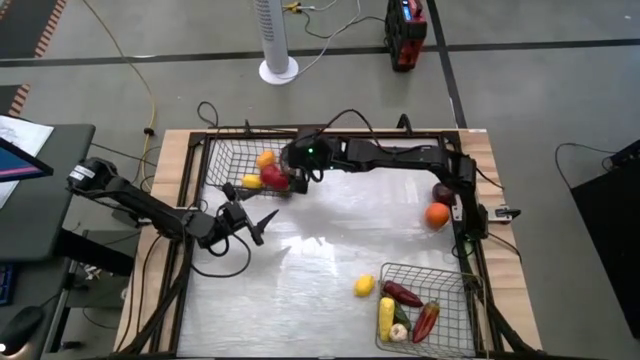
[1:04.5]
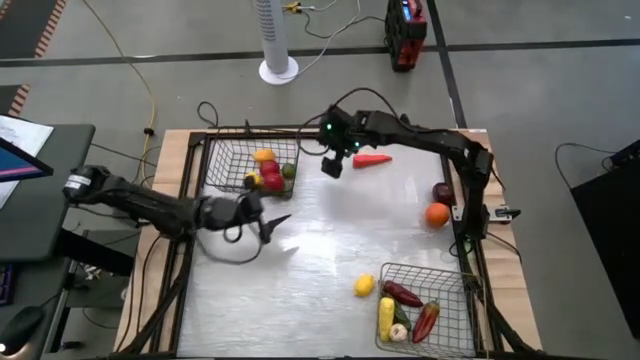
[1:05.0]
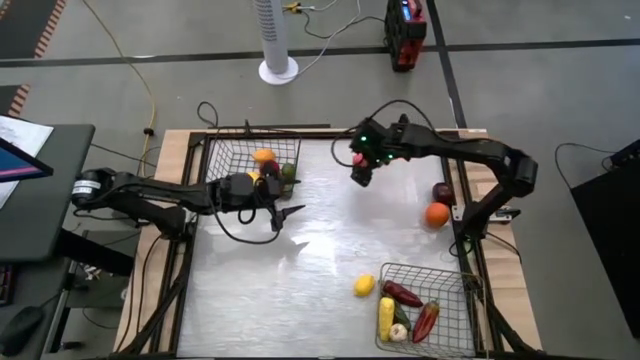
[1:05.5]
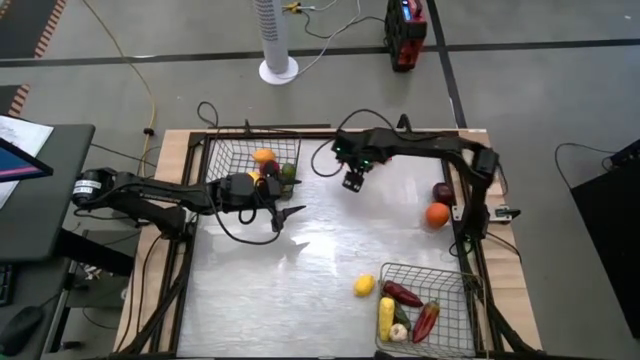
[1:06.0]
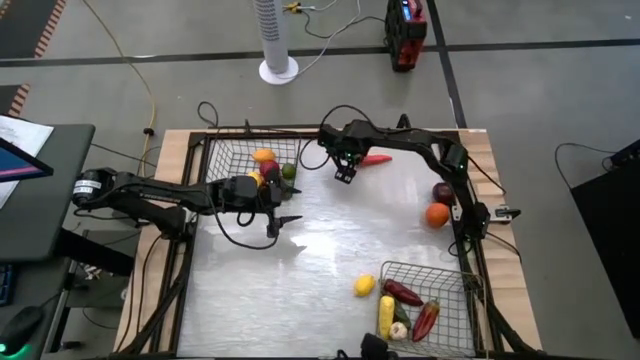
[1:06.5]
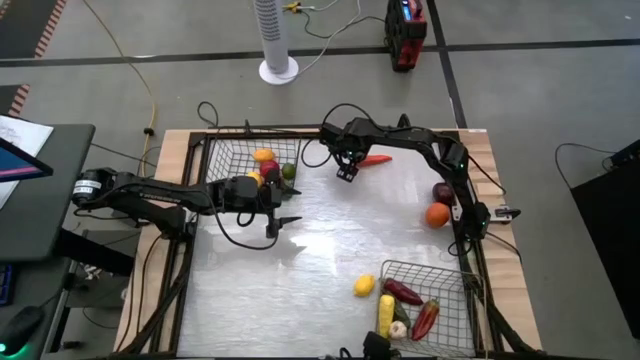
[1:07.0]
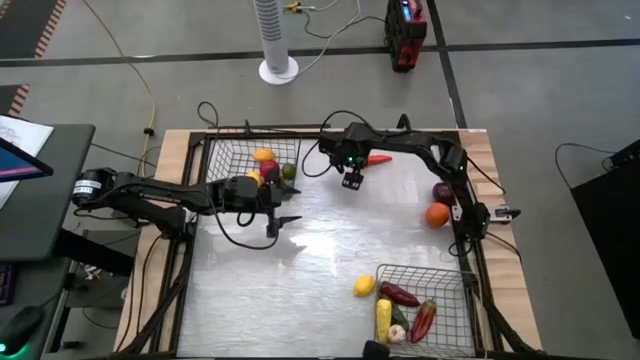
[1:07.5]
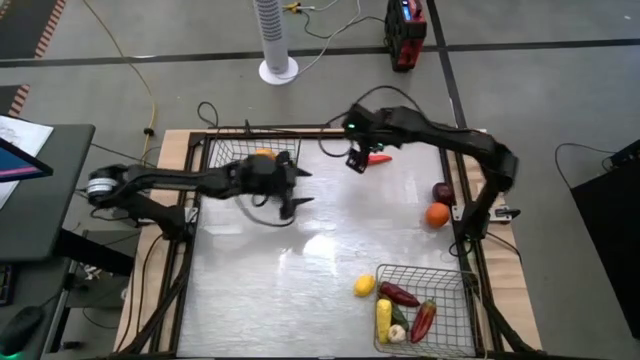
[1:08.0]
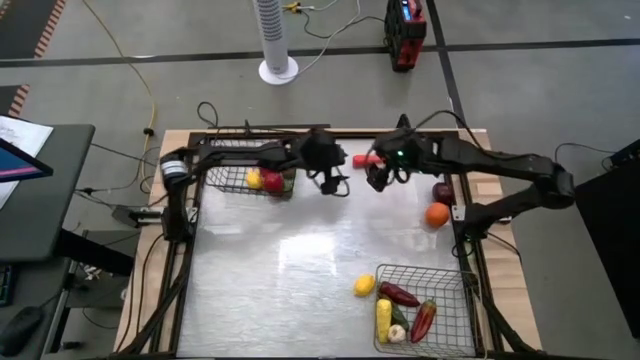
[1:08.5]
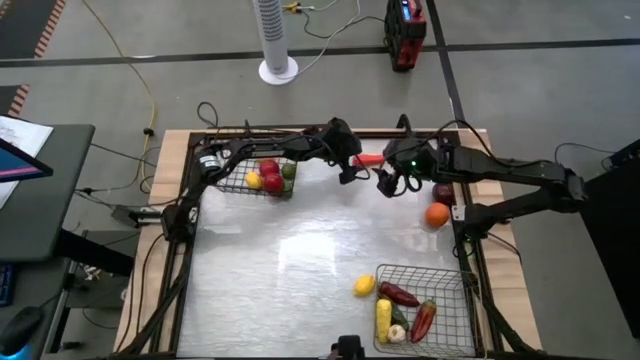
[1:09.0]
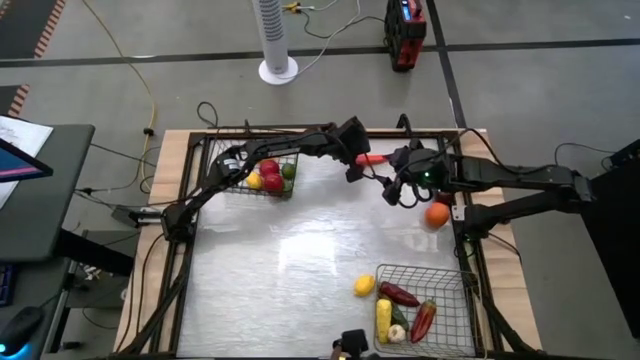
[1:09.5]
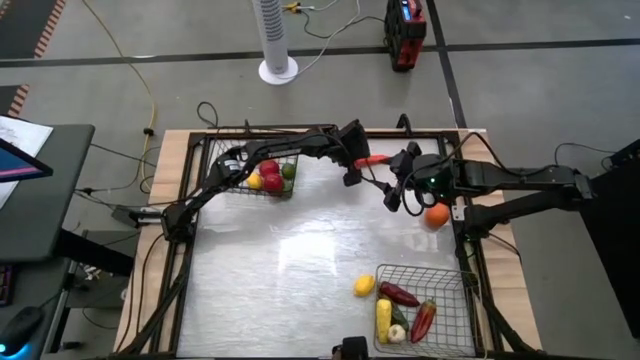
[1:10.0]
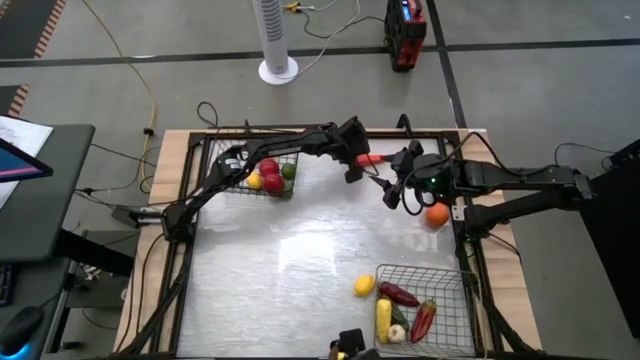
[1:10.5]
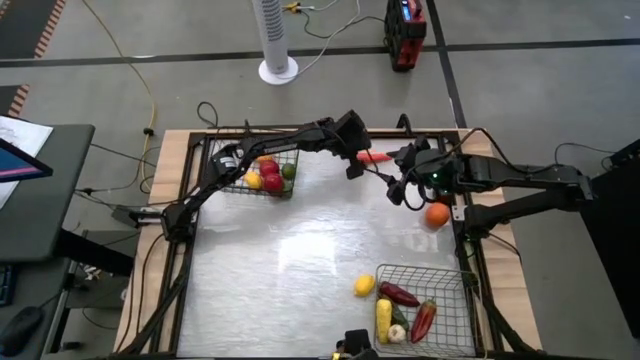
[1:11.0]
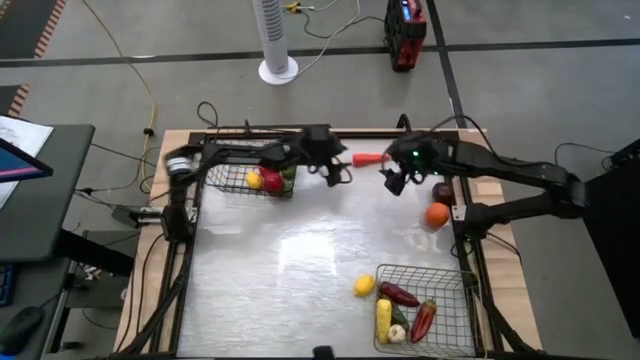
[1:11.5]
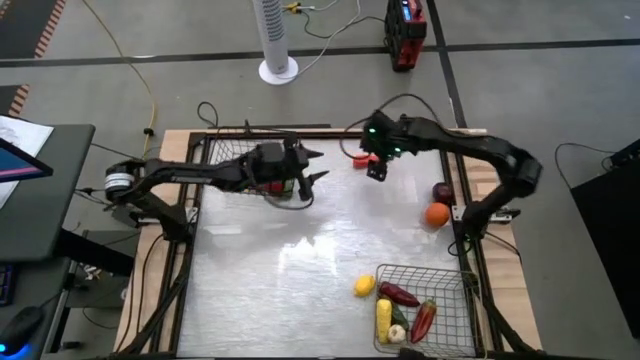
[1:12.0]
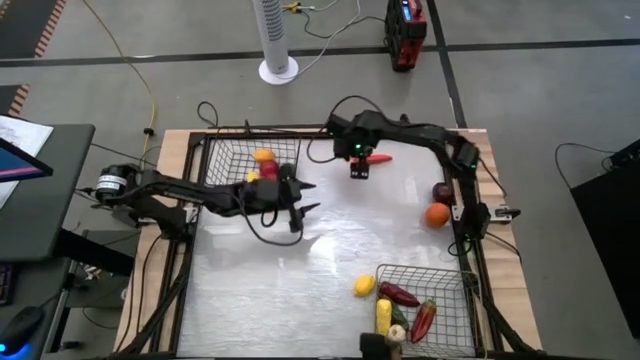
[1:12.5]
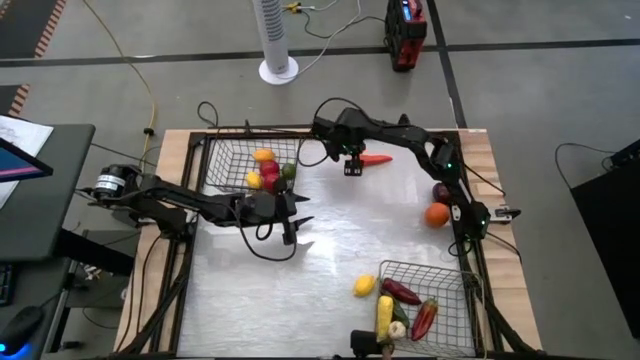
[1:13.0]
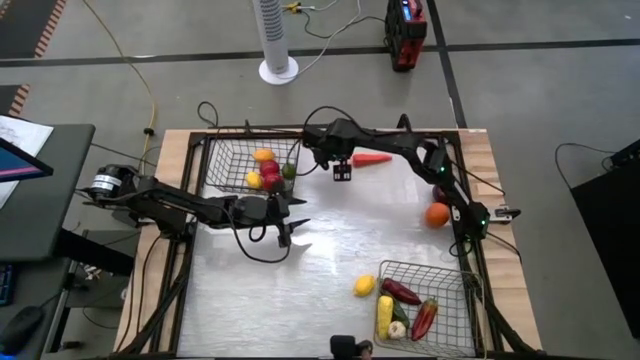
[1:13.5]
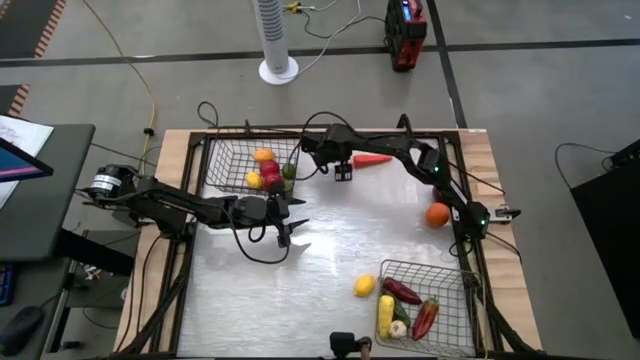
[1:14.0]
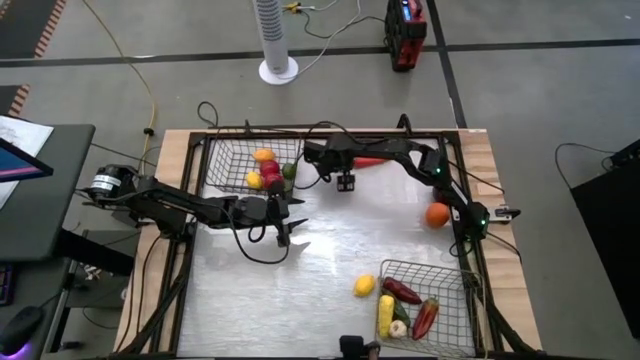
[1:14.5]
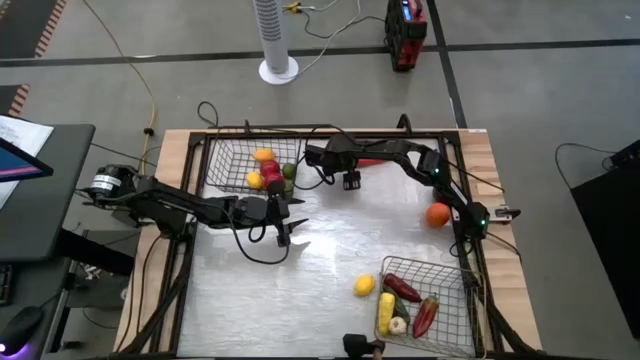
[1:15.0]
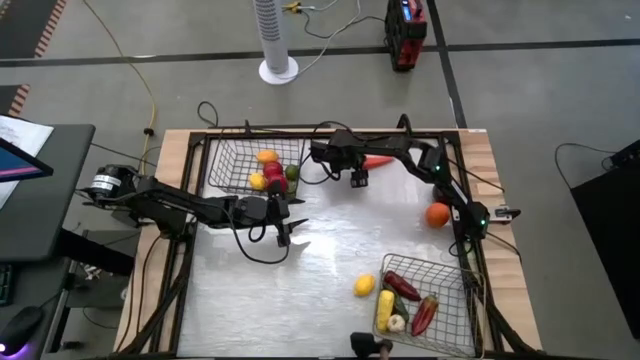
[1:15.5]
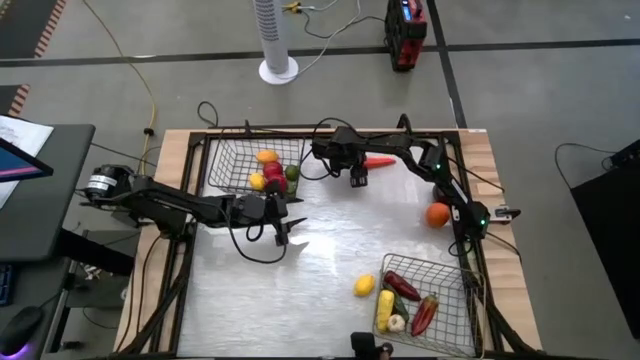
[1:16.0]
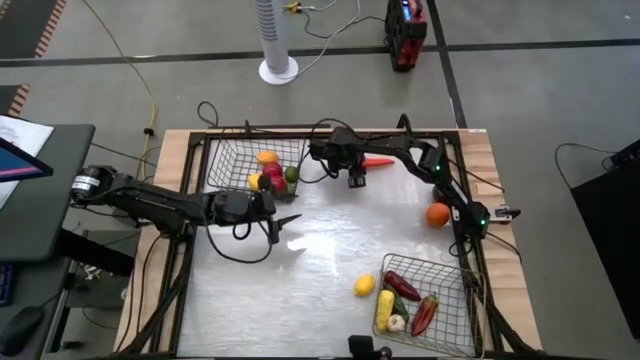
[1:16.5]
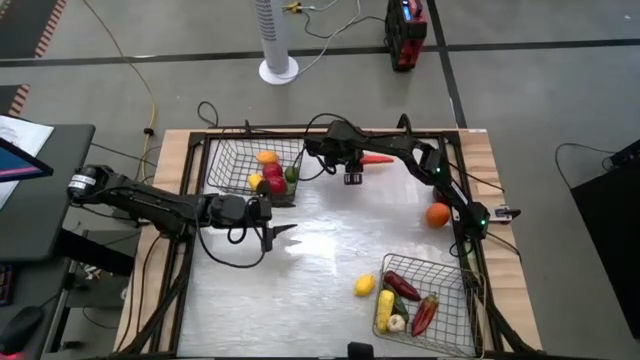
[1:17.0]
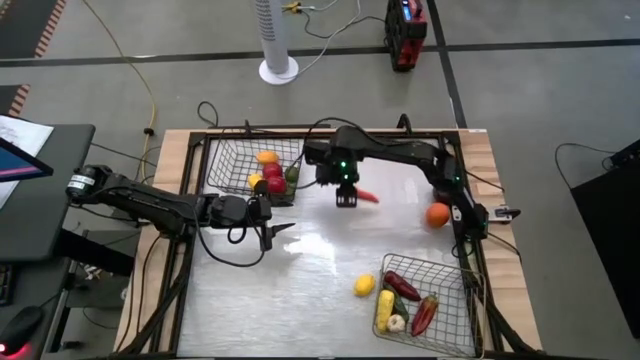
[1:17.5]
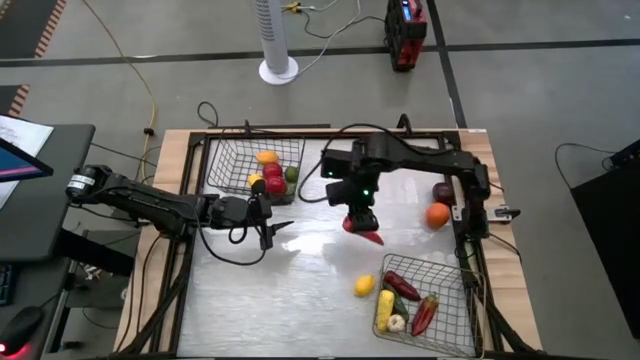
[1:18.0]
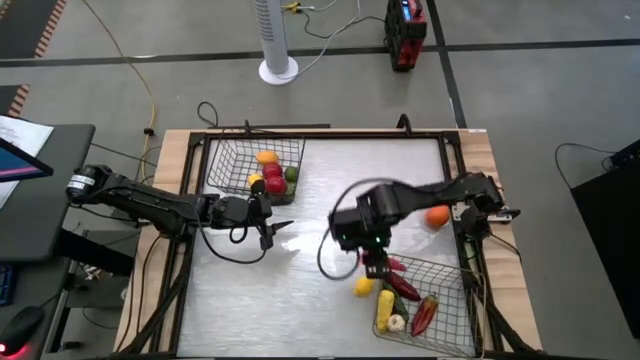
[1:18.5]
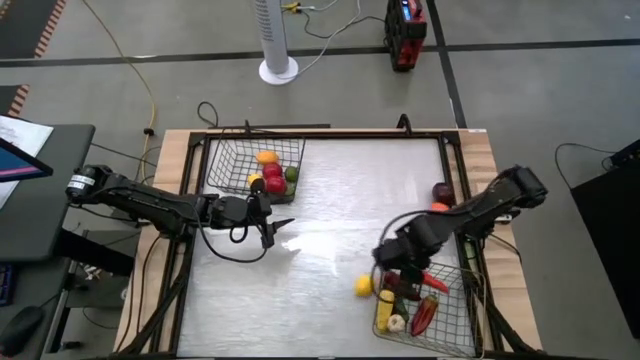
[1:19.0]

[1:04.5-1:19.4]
Task: Sort produce into baskets
Put the carrot into the golden wire basket

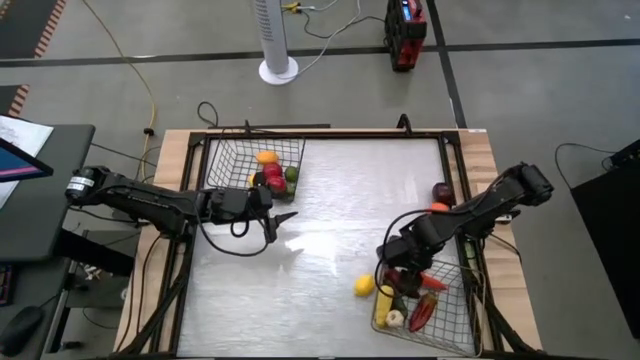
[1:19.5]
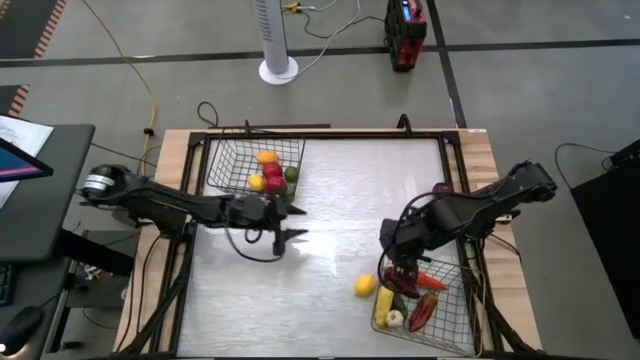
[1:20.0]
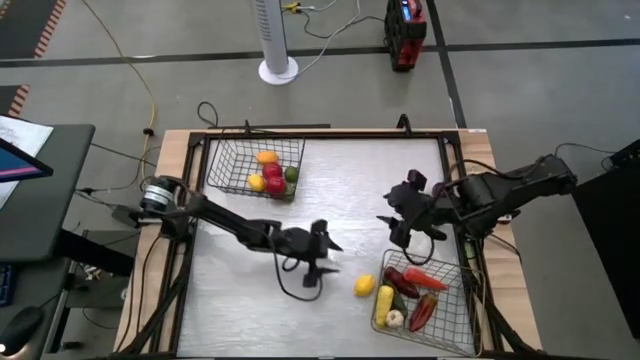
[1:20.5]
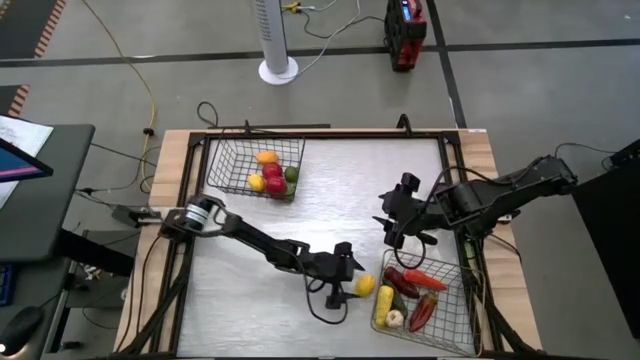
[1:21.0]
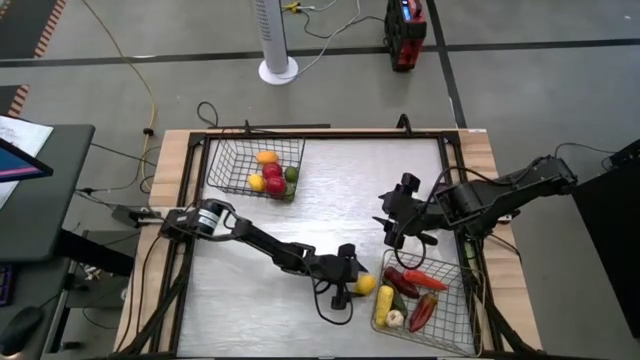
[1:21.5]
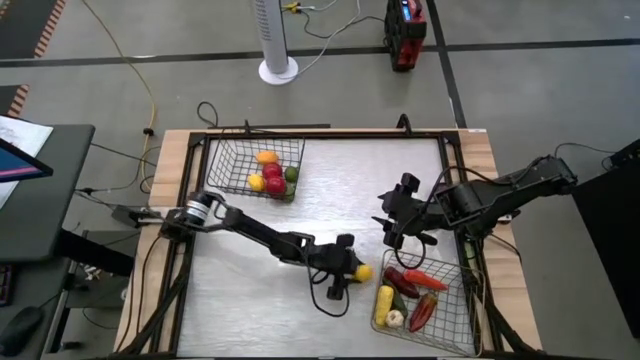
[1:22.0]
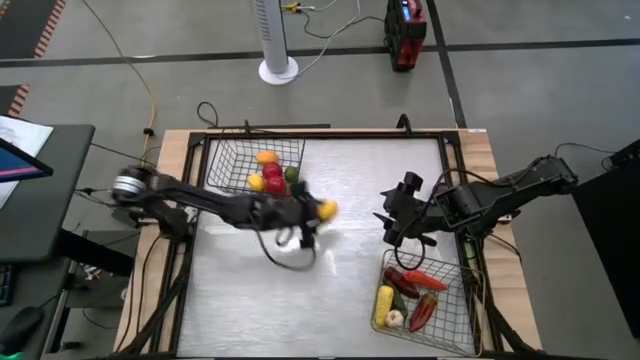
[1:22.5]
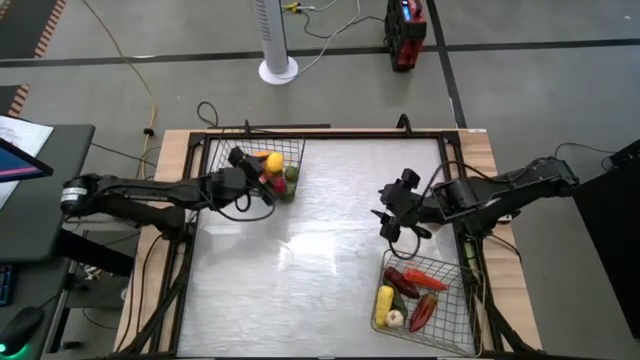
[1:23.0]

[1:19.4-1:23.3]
Put the lemon into the black wire basket

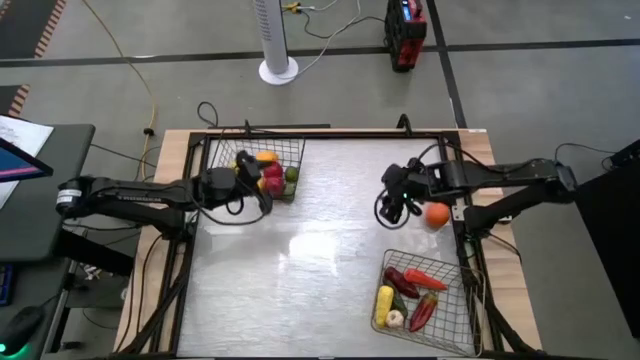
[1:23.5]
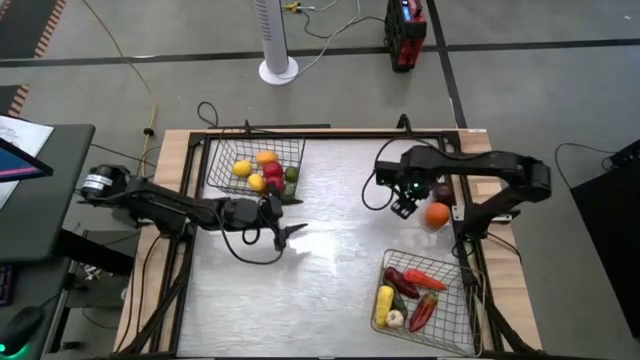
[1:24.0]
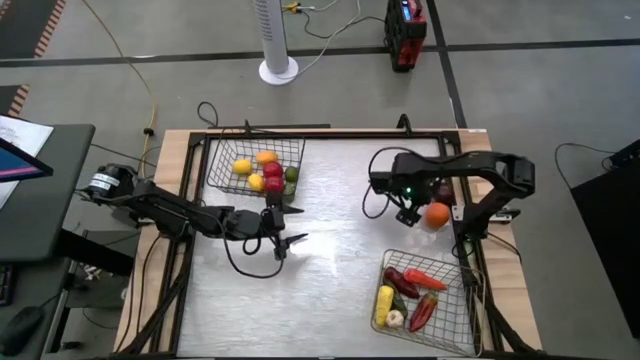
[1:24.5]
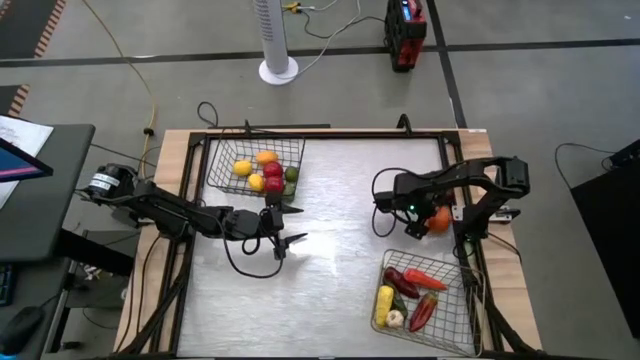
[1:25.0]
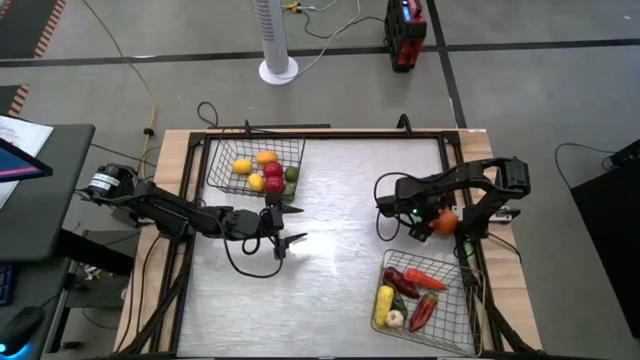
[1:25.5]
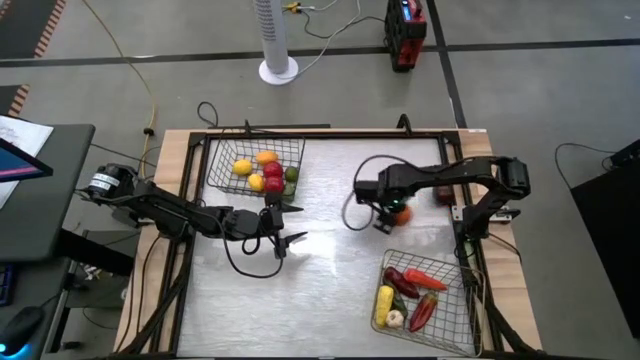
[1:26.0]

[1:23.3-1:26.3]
Put the orange into the black wire basket
